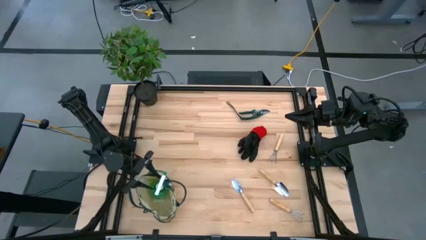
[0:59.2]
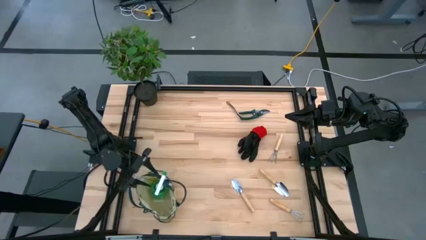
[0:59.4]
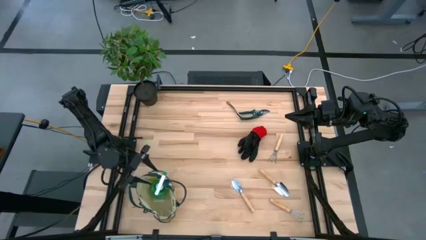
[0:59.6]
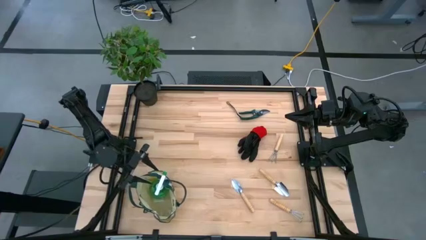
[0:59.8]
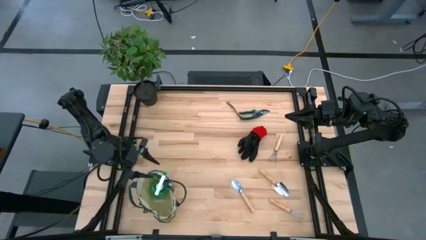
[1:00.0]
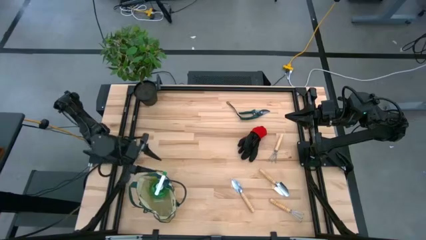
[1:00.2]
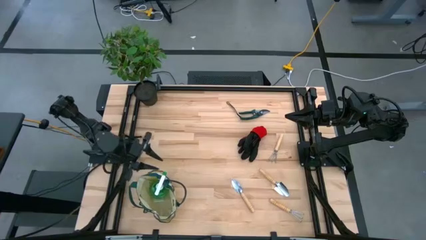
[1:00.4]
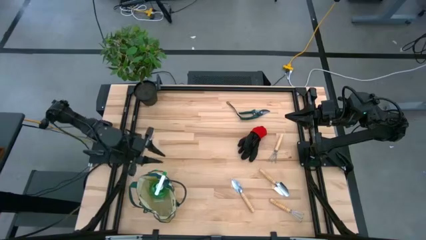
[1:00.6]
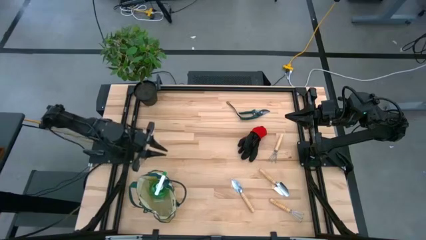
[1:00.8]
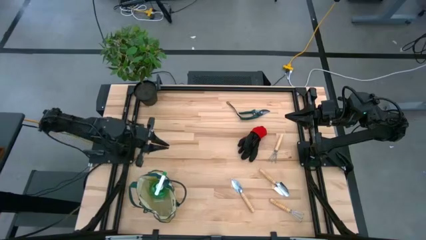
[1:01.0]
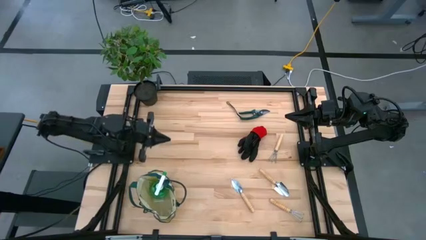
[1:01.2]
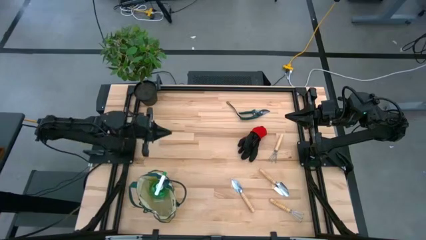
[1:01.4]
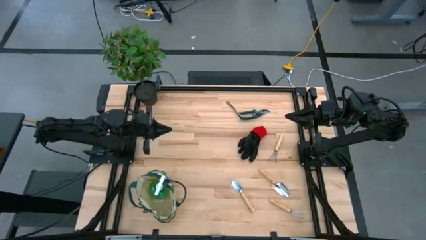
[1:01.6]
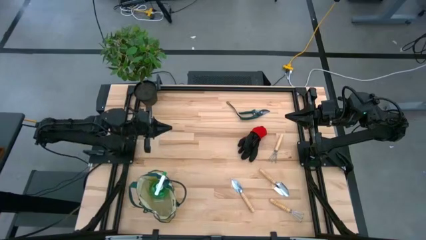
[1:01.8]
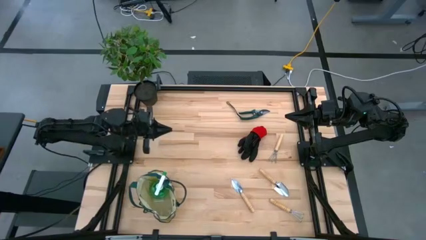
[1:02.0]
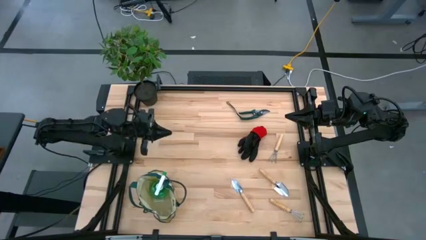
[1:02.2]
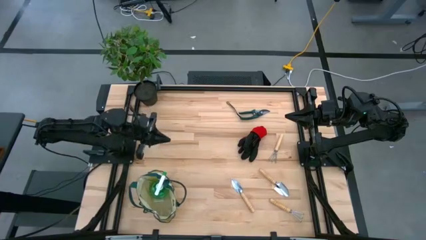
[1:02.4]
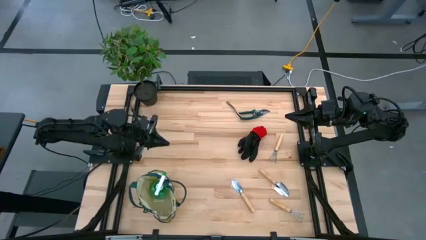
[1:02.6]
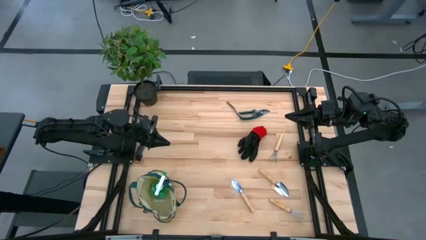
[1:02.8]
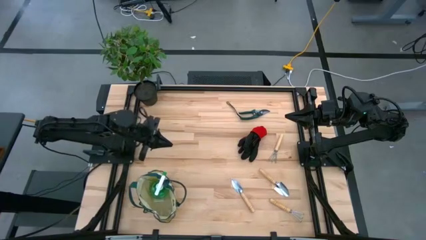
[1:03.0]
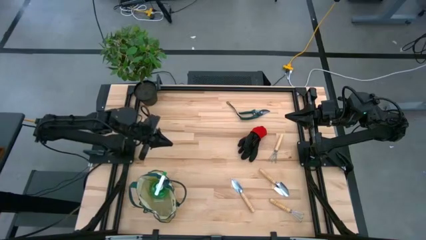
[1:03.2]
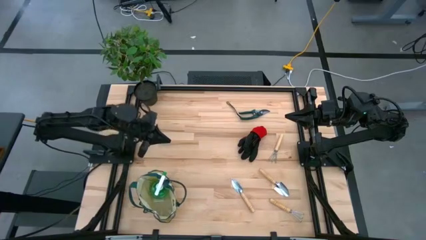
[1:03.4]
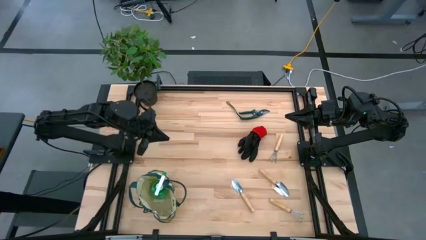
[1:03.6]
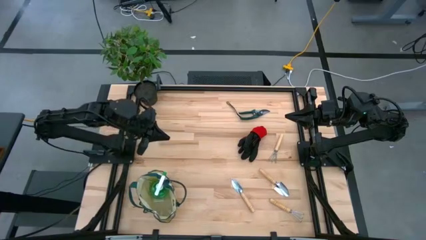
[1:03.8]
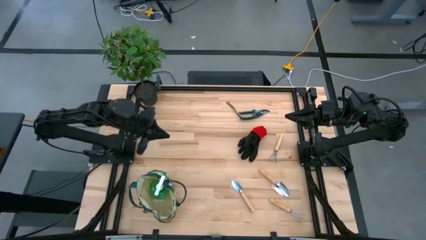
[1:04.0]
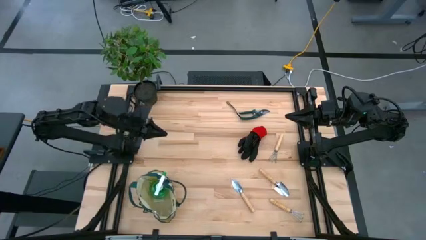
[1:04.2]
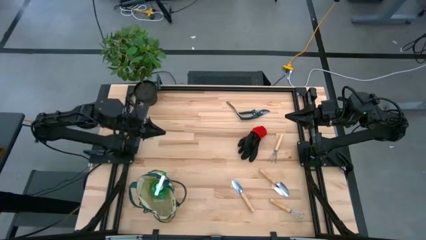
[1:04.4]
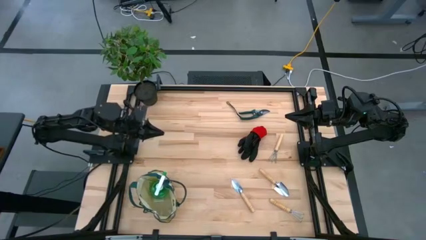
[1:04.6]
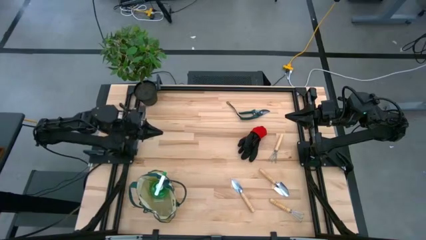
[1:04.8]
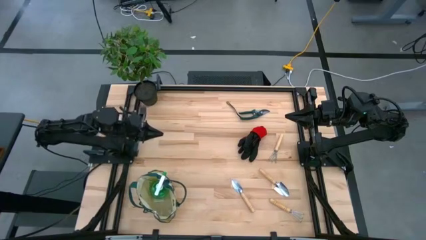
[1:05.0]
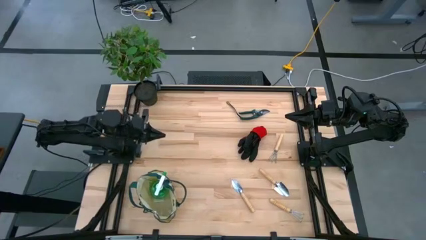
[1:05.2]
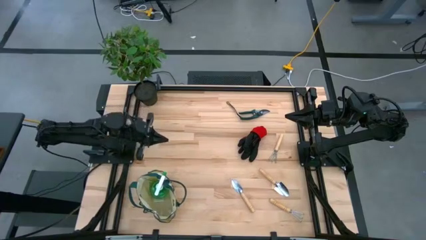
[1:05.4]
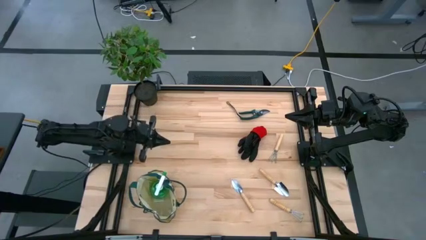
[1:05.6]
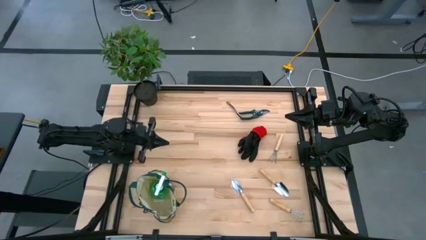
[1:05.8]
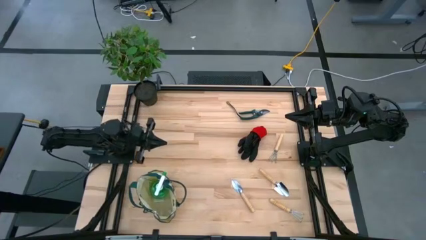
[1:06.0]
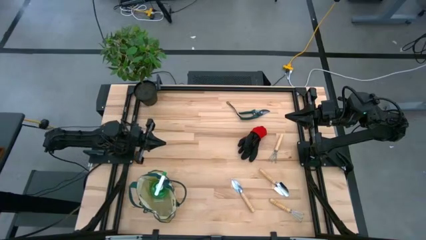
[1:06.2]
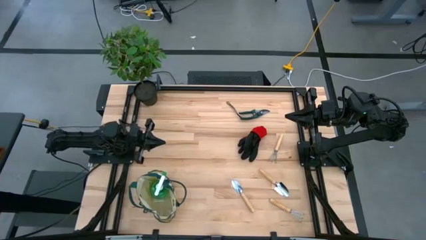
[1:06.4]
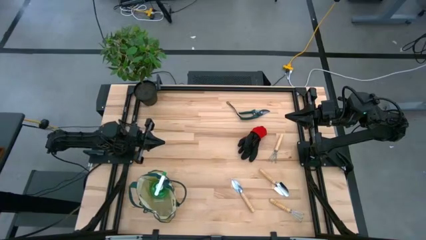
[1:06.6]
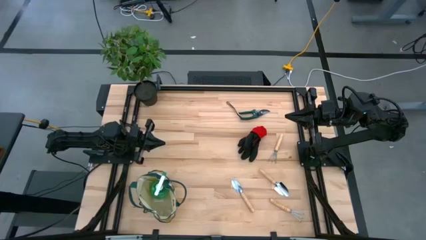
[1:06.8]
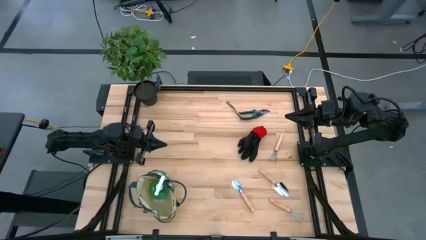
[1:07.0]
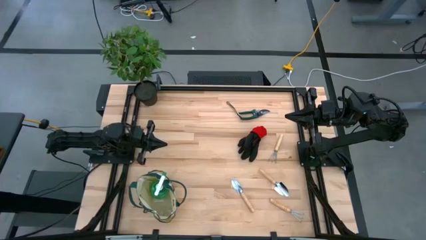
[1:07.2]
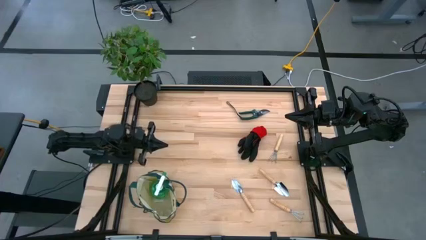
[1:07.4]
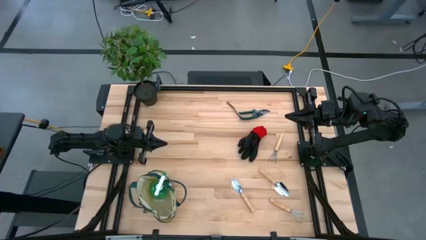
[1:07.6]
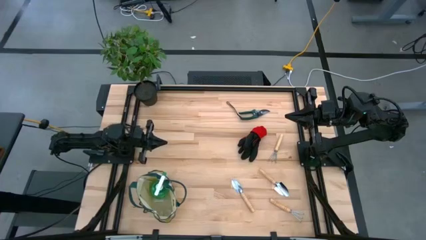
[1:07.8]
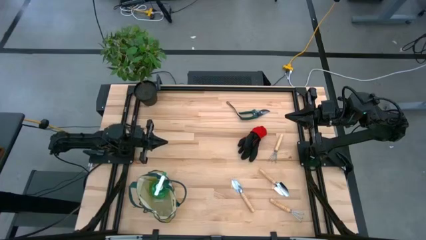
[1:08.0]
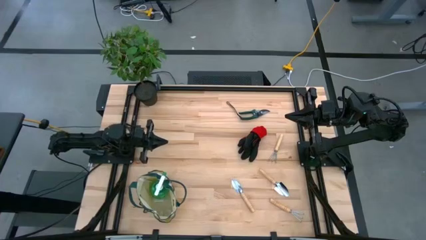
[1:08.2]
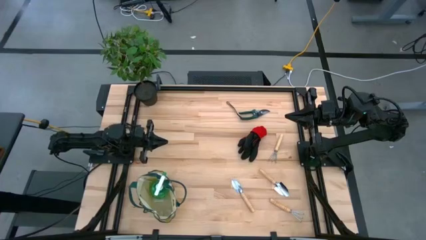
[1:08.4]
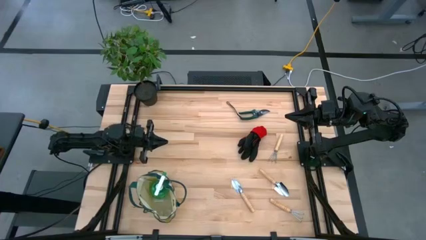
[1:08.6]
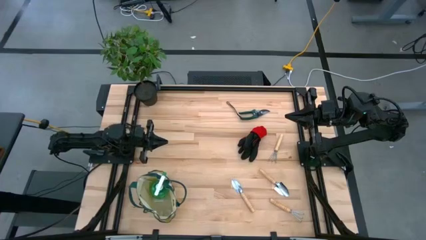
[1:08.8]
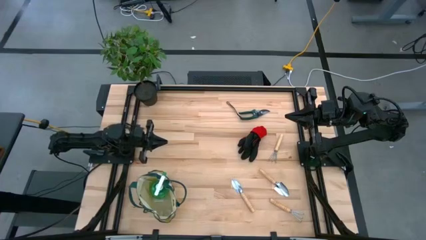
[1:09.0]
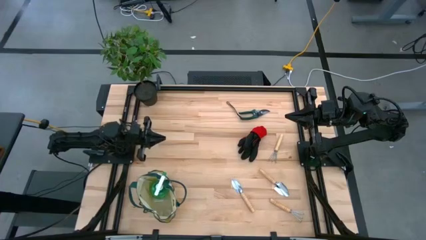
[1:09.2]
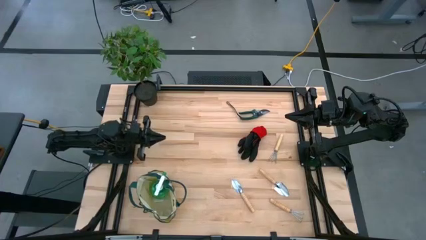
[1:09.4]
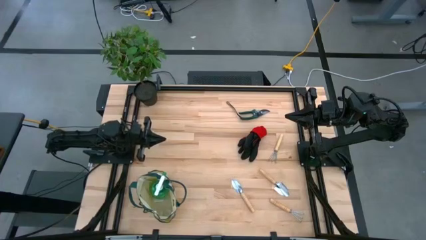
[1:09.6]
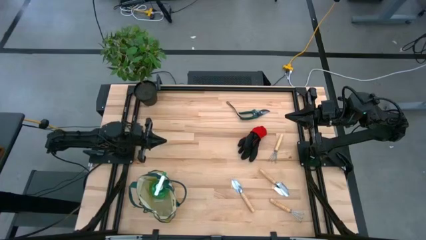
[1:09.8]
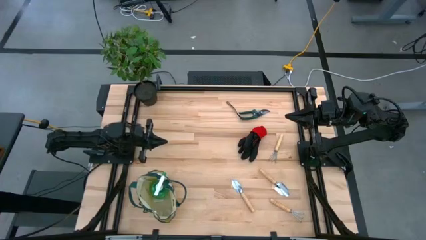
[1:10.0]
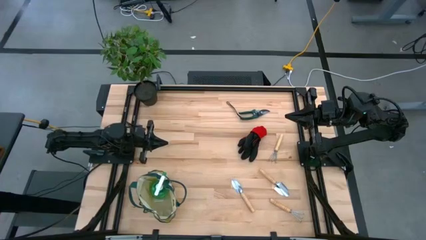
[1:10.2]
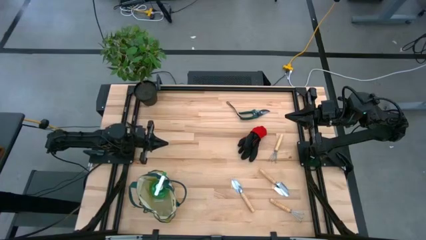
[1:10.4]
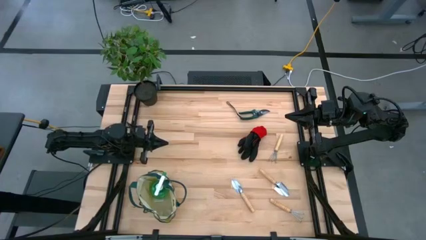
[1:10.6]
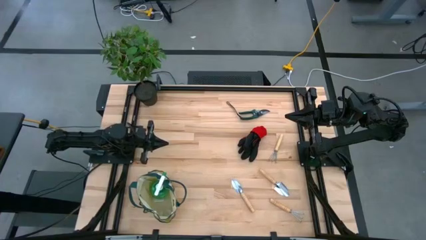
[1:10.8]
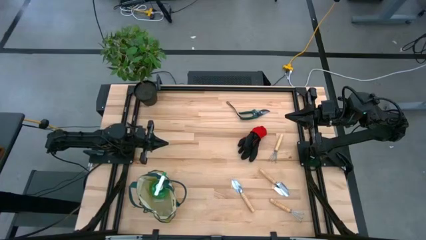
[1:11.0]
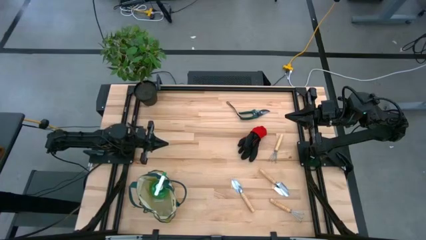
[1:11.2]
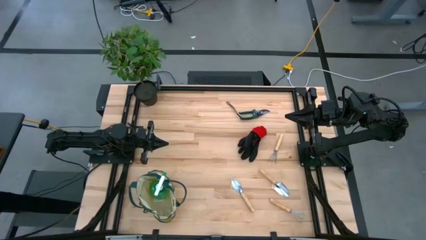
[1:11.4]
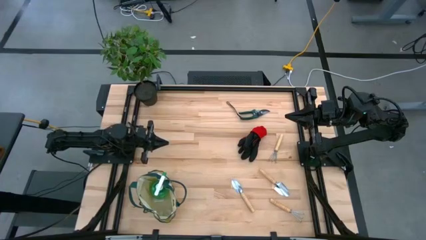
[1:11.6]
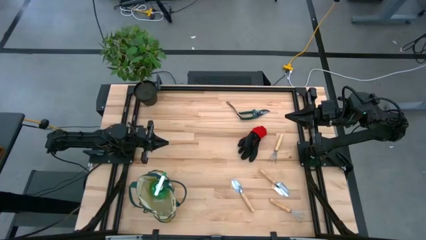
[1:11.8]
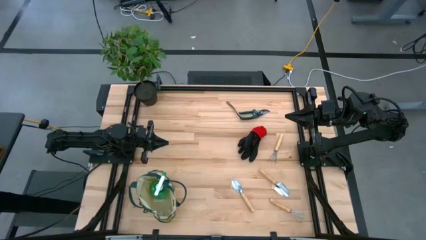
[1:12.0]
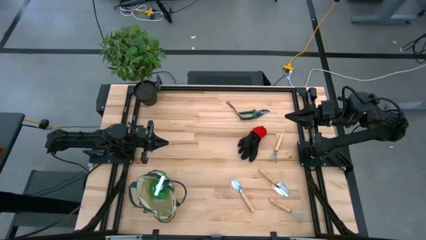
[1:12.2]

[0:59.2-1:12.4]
Task: Pick & Place Garden tools in Gardening bag
Put the shear scissors into the gardening bag
